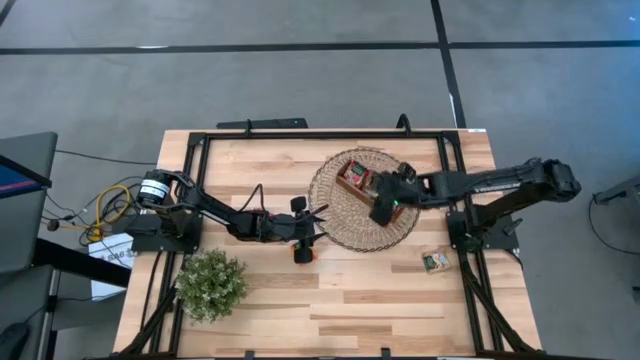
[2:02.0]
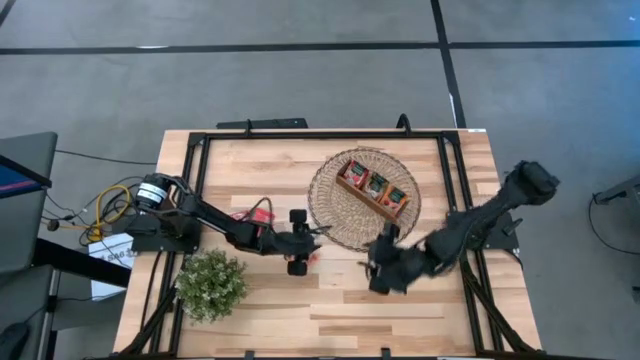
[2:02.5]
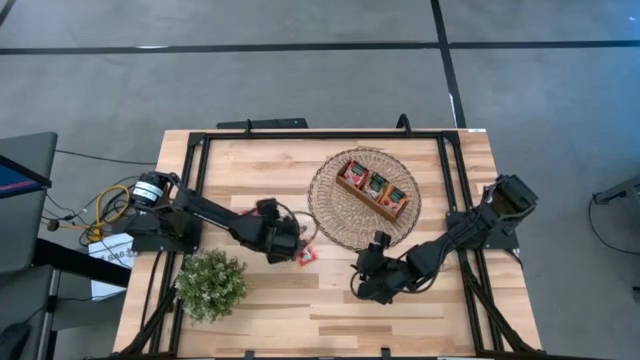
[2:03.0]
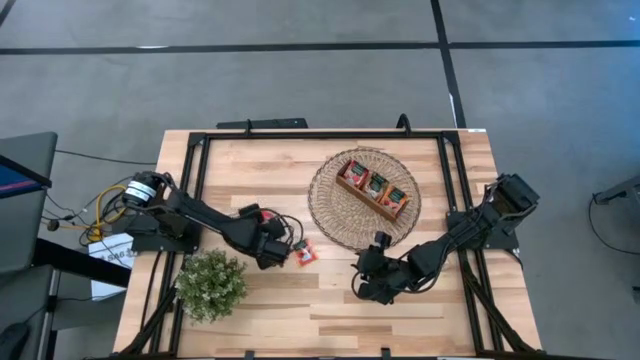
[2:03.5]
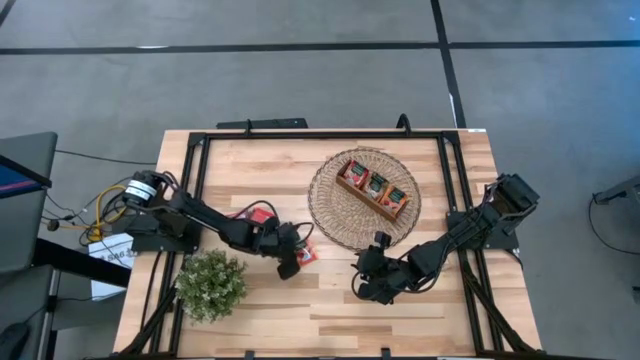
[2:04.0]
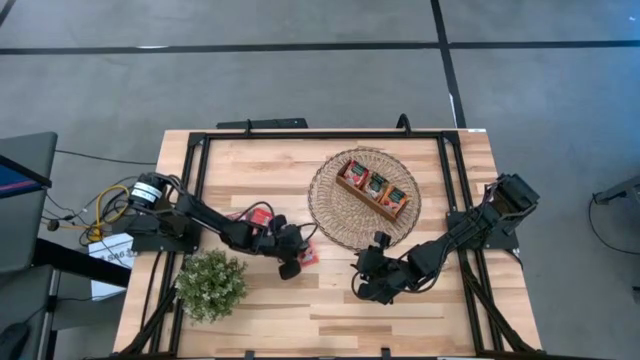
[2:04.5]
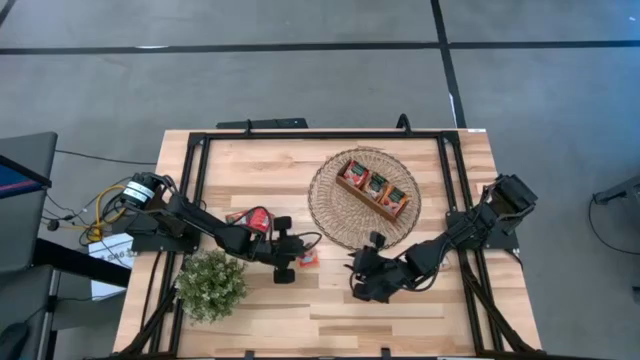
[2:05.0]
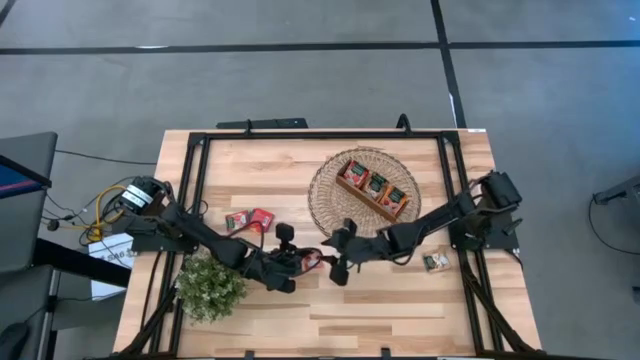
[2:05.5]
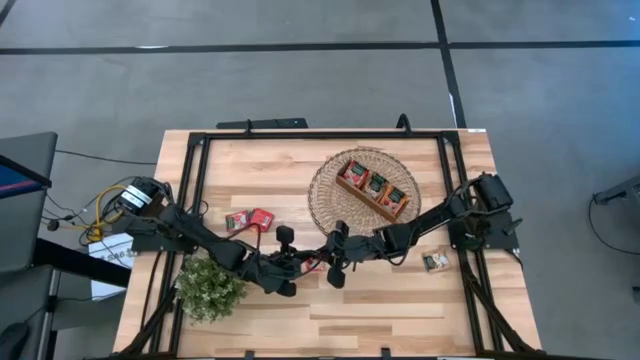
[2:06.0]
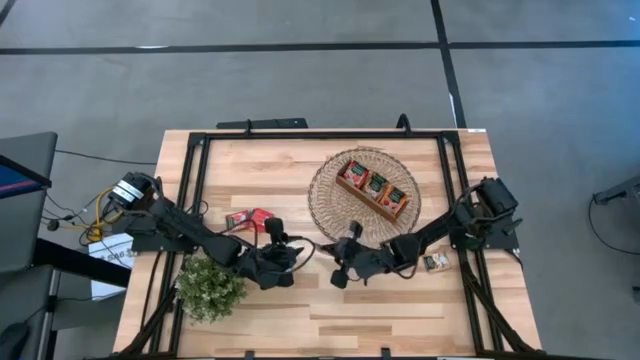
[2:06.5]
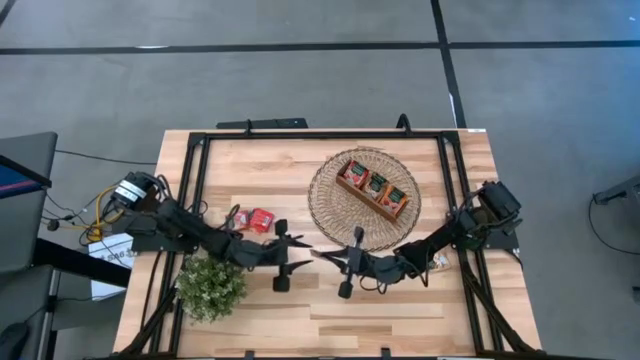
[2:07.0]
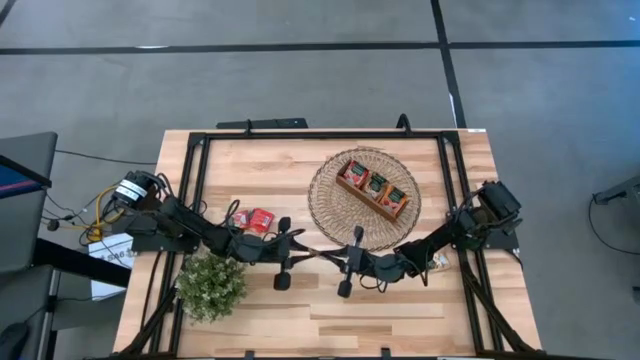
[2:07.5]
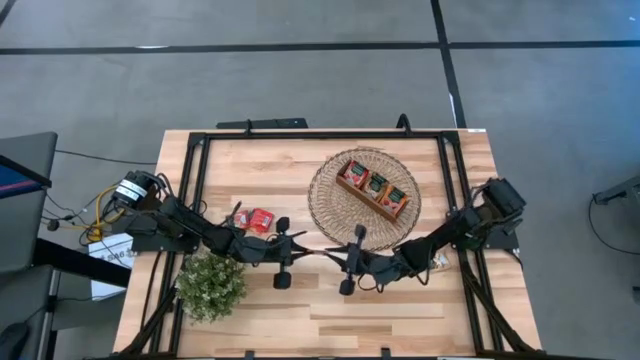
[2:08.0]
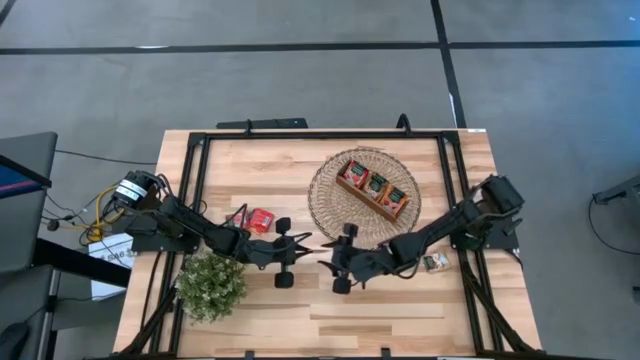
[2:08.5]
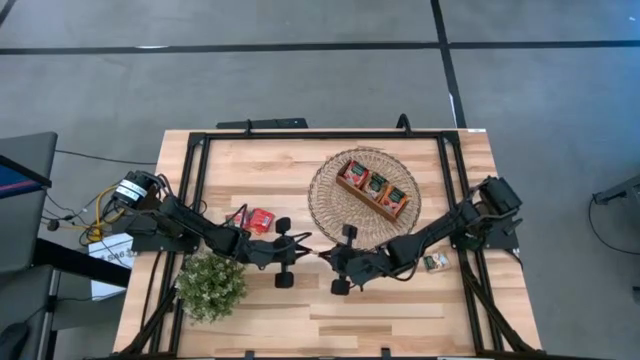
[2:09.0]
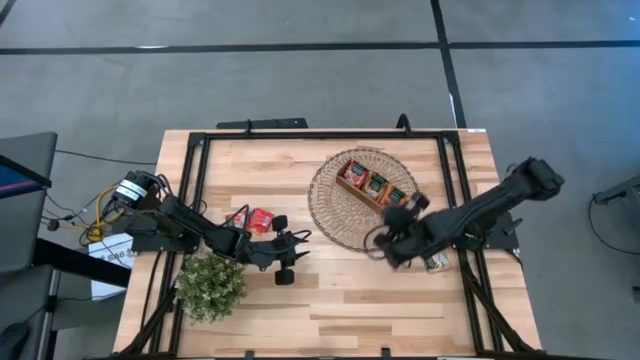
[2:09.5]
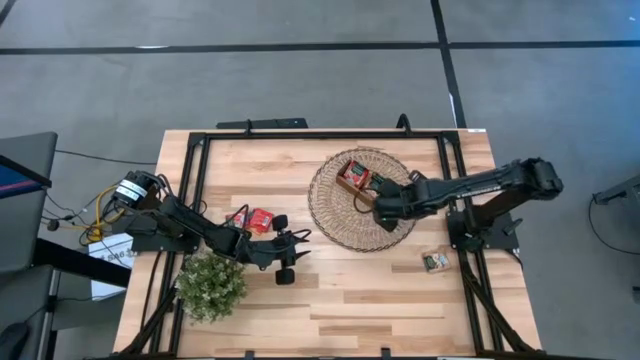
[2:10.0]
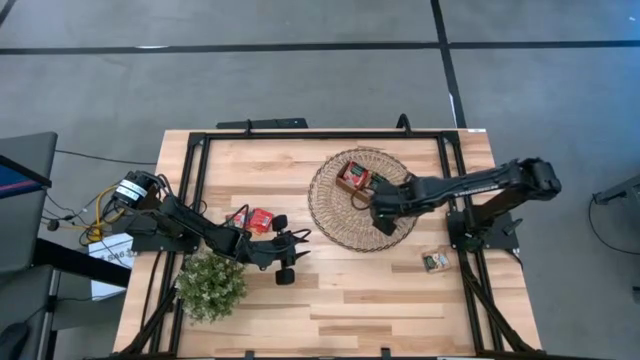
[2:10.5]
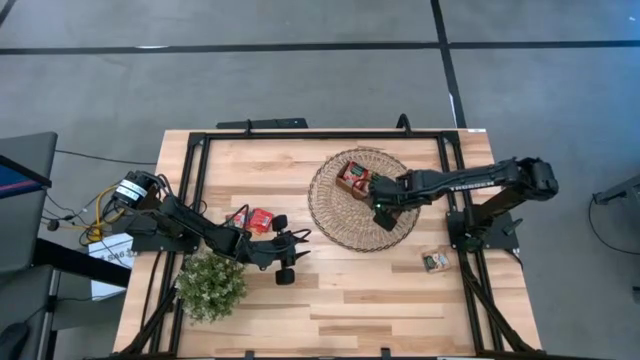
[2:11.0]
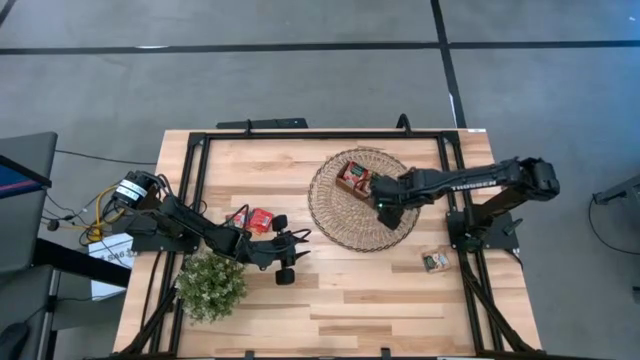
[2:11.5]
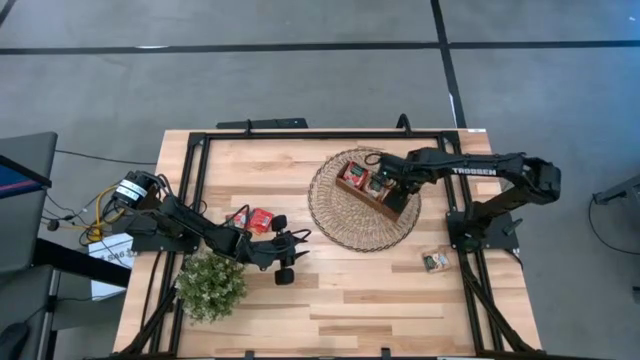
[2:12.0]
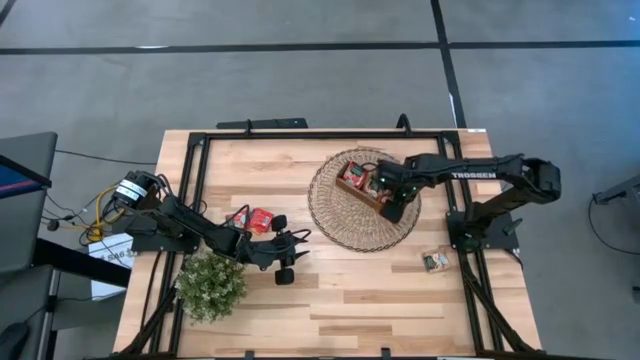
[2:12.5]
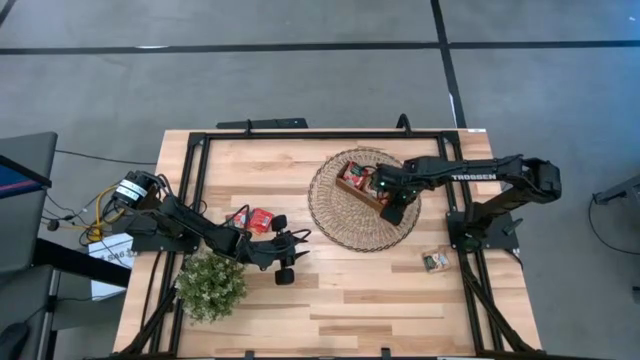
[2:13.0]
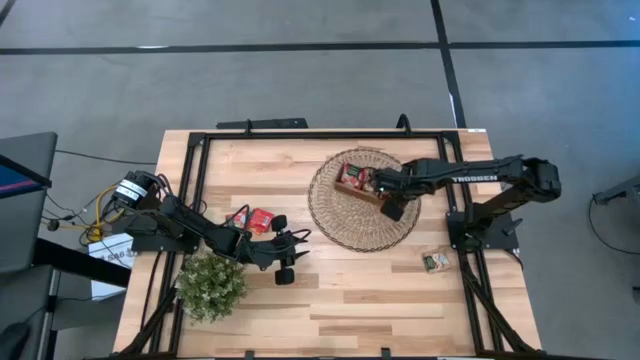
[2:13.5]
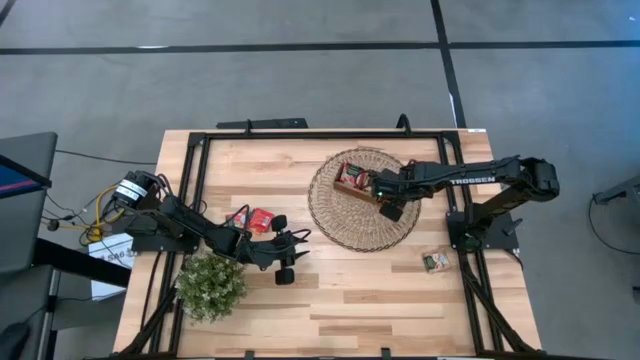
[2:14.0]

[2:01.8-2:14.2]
Task: Pick & Place Tea
Put the orange tea bag into the right section of the wooden organizer

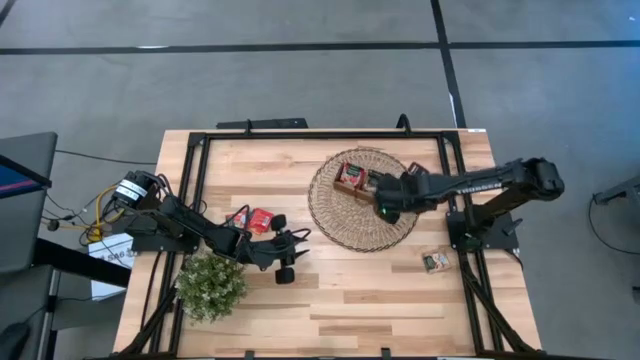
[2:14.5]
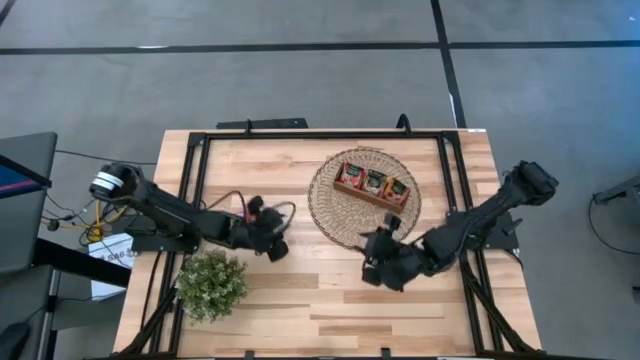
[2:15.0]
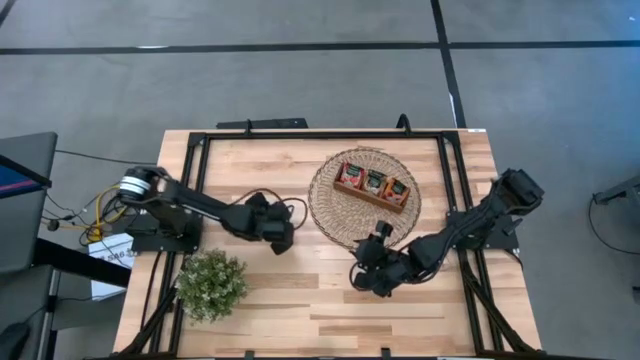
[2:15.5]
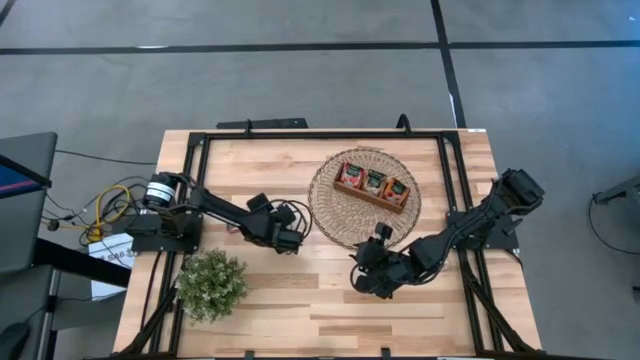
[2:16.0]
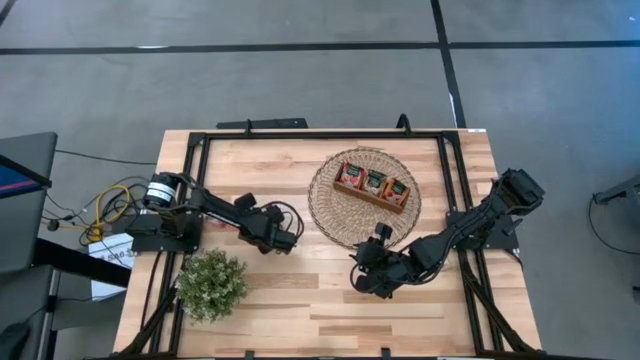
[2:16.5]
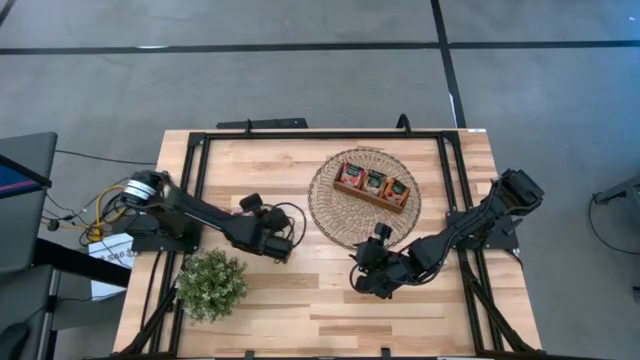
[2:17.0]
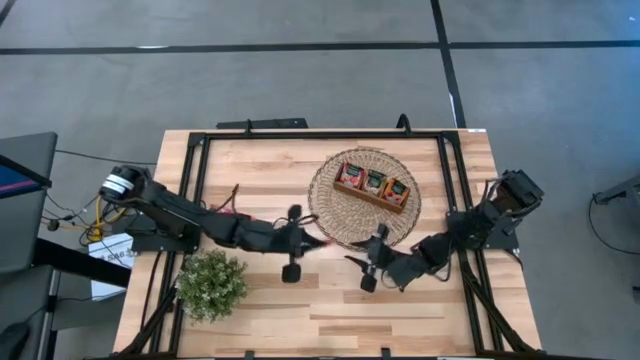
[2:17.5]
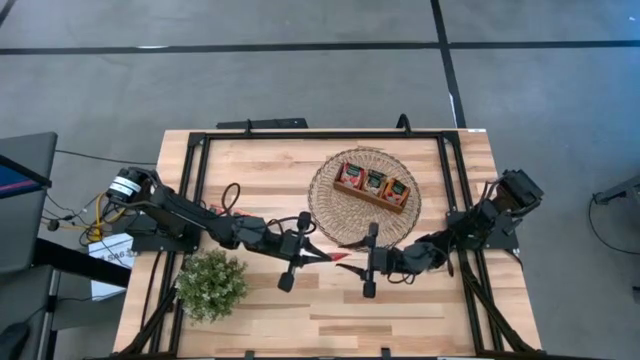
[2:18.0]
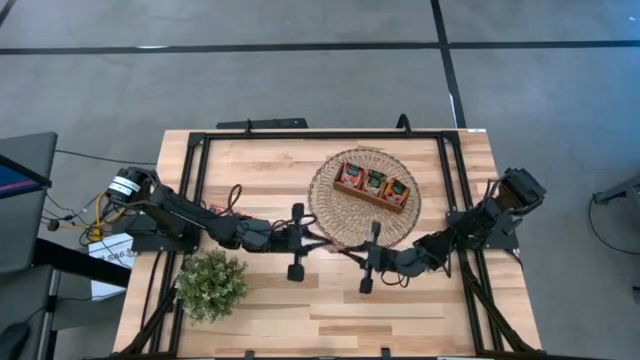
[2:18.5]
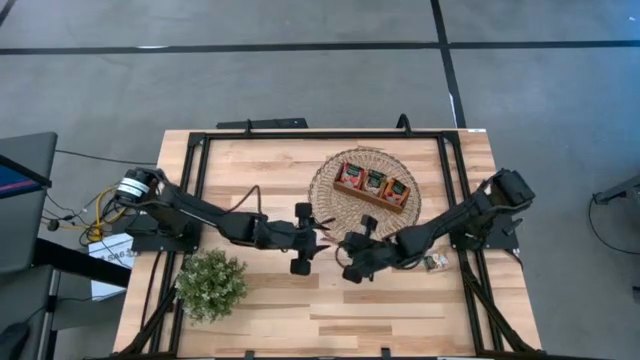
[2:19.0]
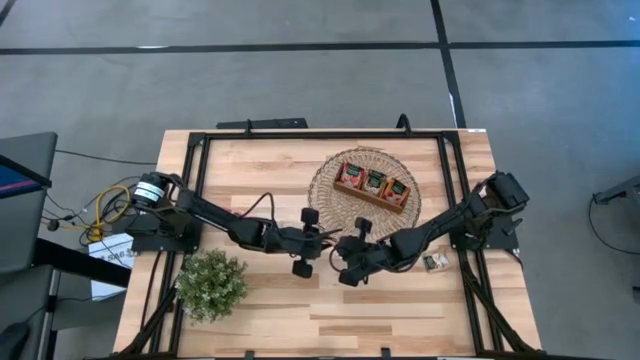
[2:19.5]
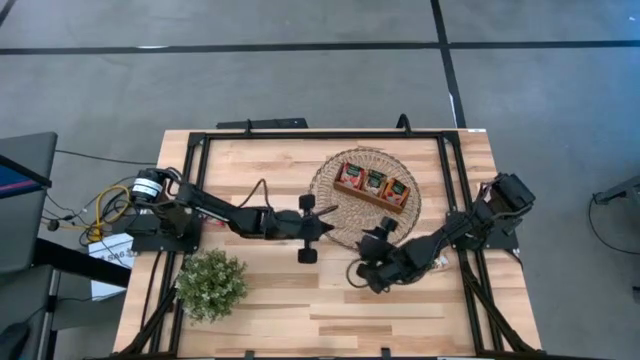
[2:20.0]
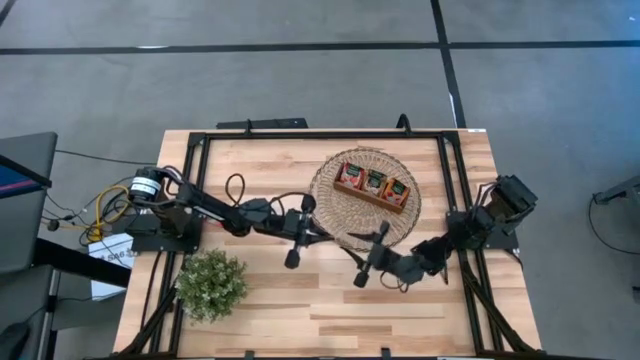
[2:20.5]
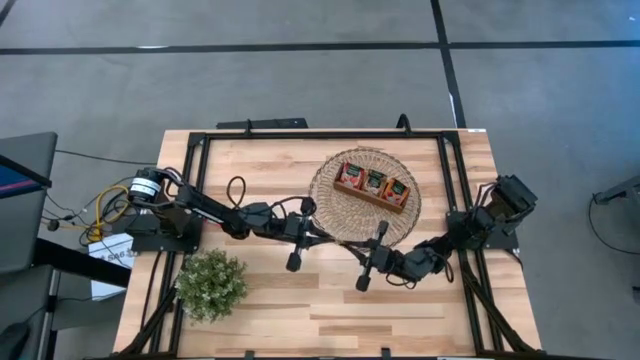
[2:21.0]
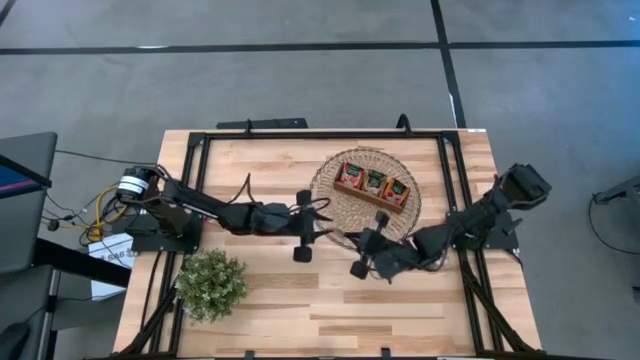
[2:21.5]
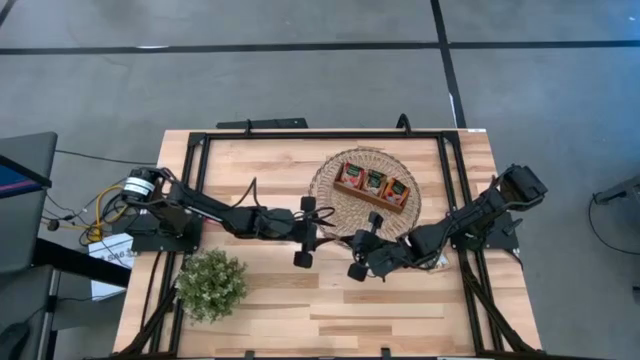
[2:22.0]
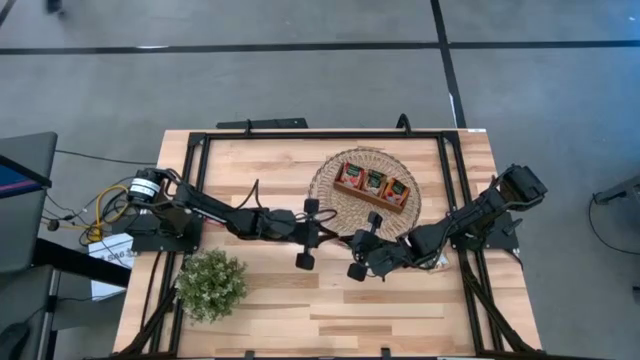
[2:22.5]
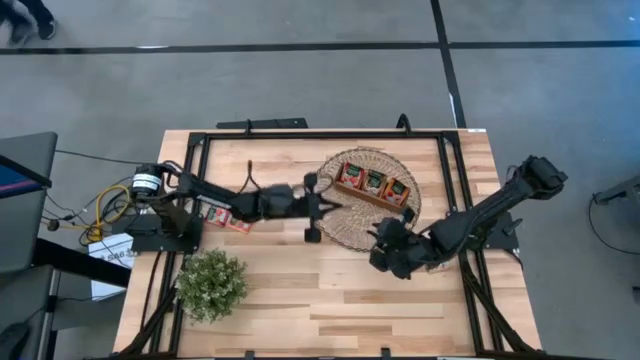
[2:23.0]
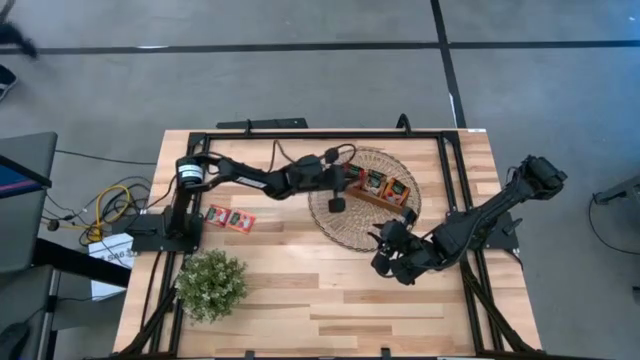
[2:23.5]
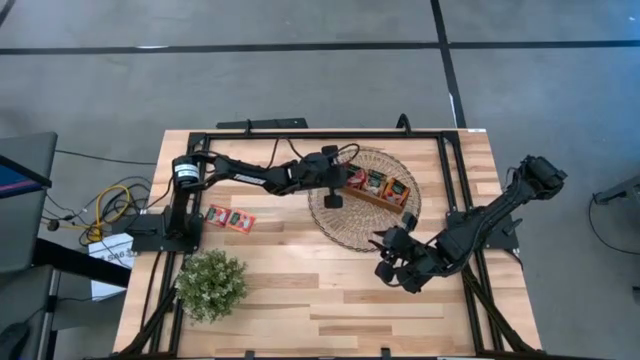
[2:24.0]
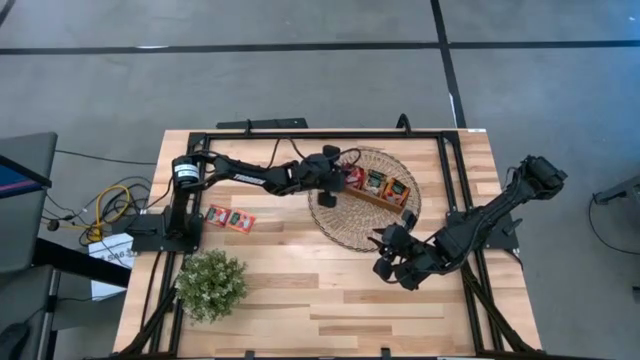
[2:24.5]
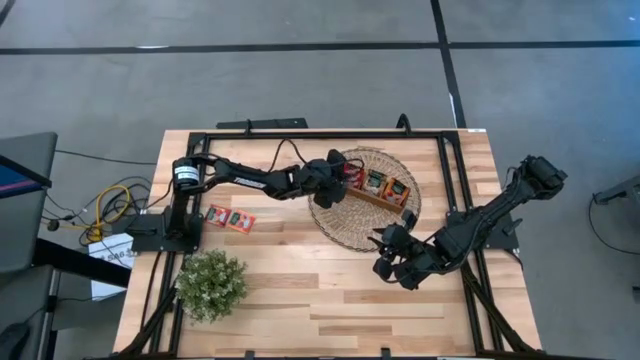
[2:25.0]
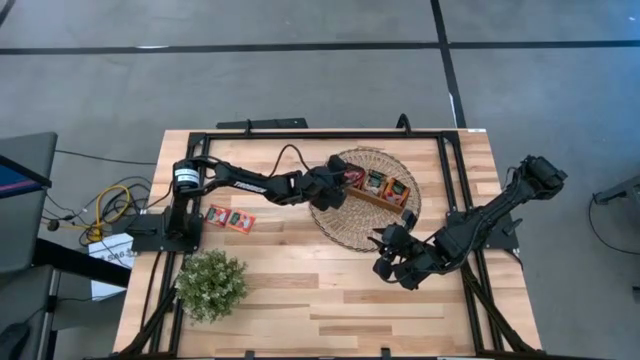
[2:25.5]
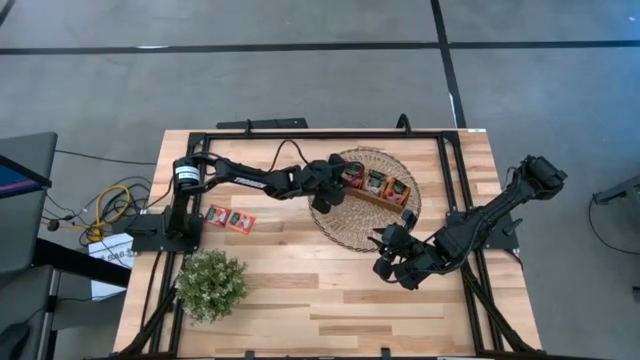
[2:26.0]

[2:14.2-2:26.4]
Put the red tea bag into the left section of the wooden organizer
